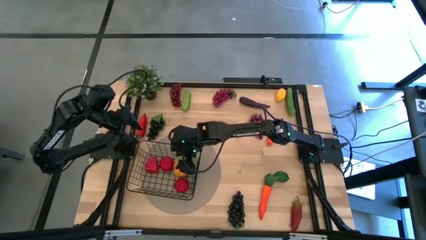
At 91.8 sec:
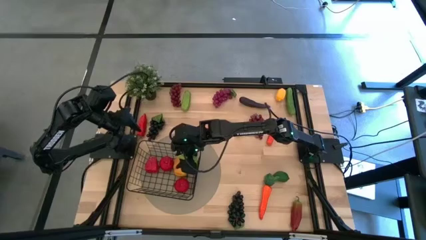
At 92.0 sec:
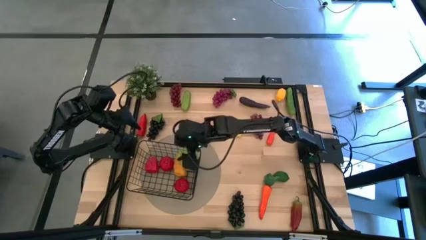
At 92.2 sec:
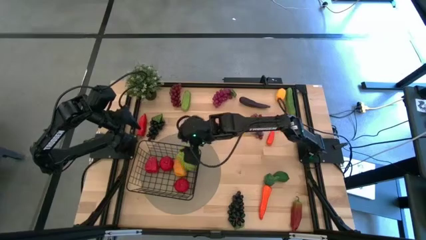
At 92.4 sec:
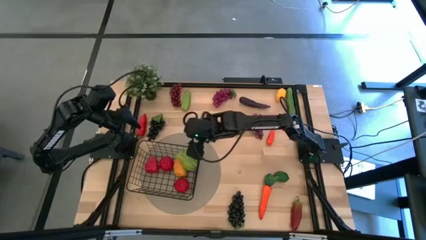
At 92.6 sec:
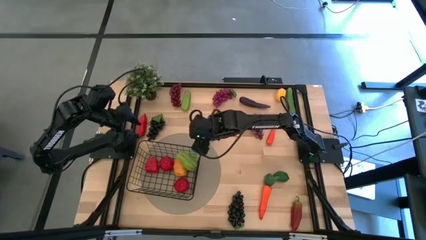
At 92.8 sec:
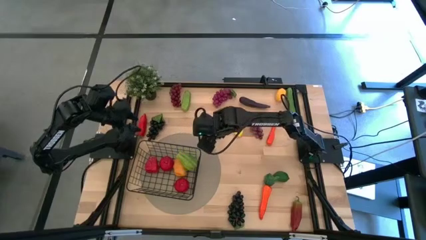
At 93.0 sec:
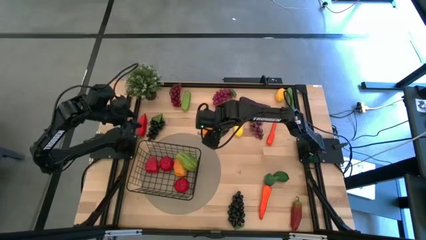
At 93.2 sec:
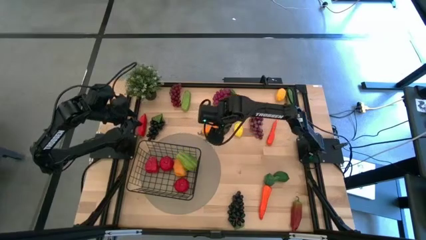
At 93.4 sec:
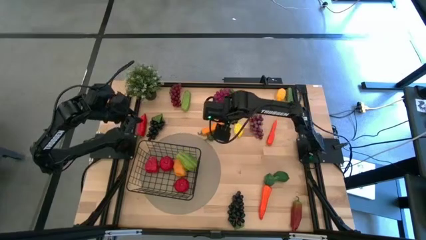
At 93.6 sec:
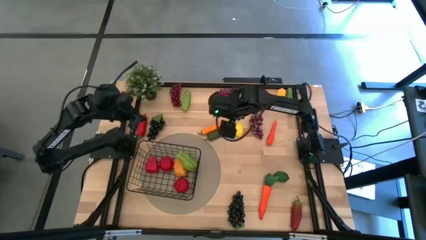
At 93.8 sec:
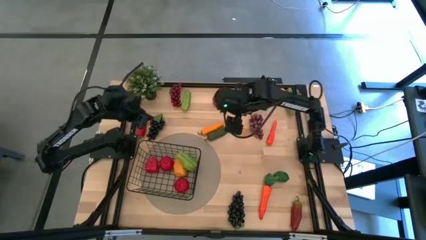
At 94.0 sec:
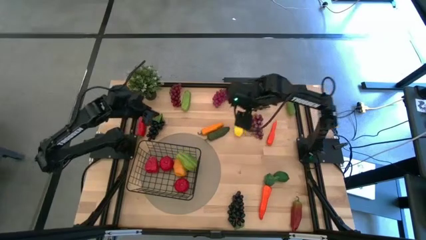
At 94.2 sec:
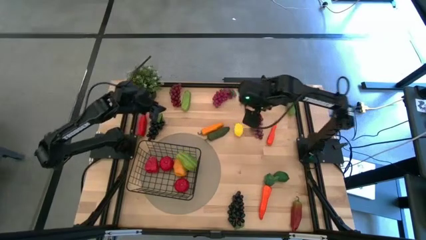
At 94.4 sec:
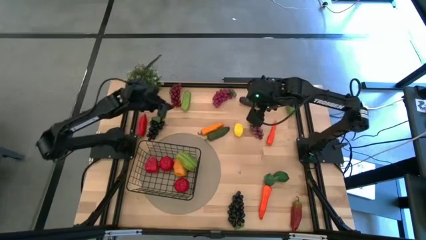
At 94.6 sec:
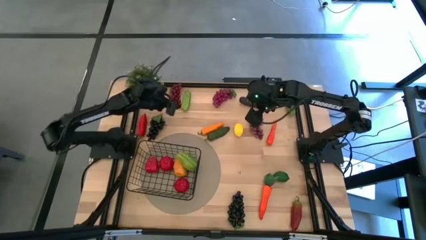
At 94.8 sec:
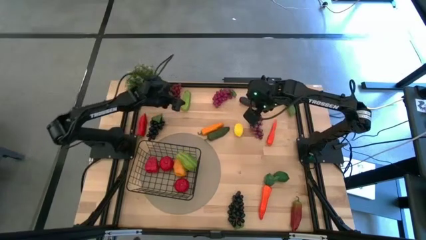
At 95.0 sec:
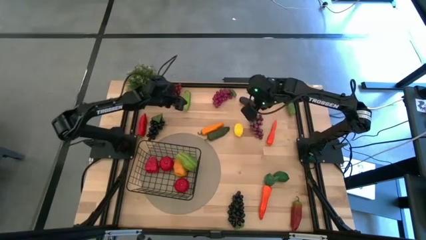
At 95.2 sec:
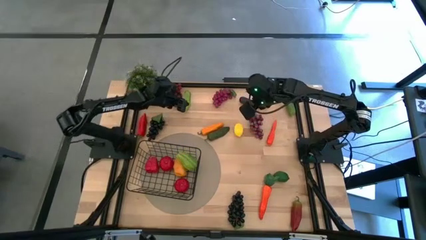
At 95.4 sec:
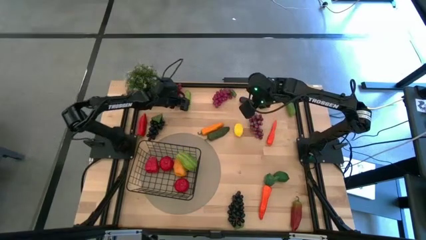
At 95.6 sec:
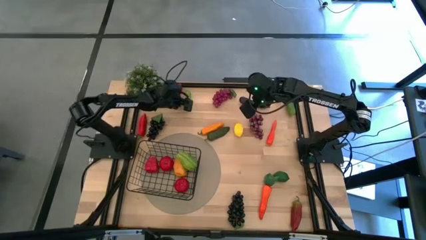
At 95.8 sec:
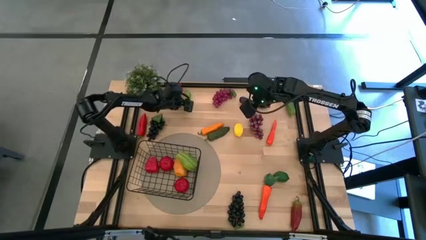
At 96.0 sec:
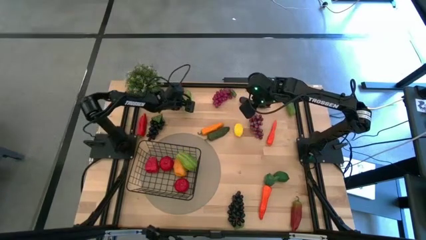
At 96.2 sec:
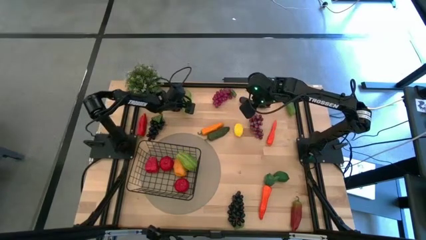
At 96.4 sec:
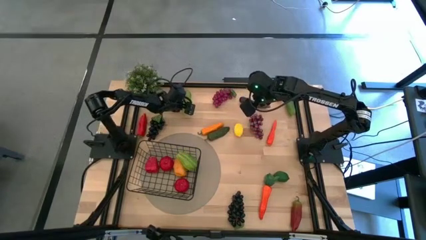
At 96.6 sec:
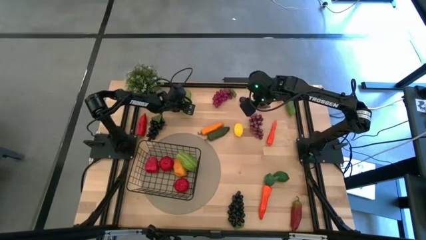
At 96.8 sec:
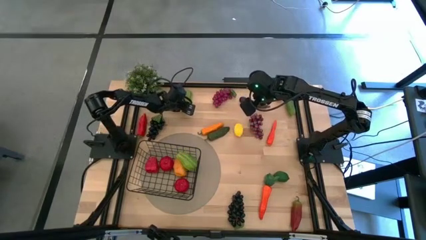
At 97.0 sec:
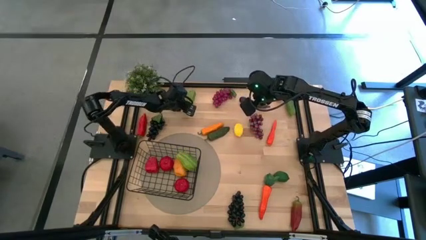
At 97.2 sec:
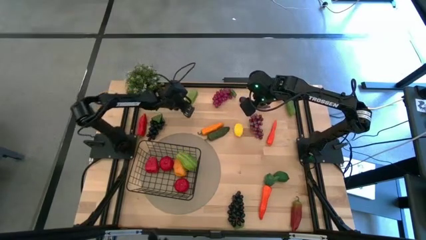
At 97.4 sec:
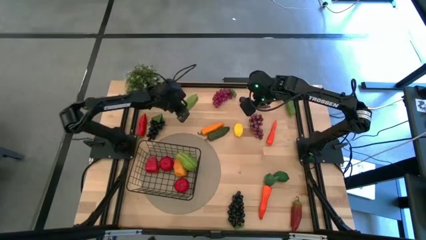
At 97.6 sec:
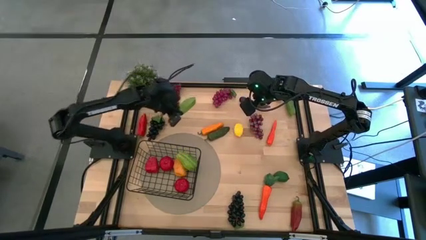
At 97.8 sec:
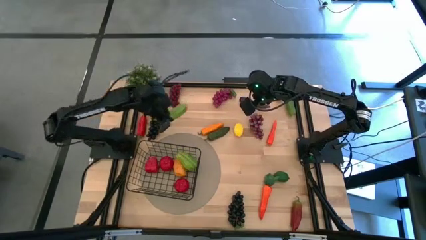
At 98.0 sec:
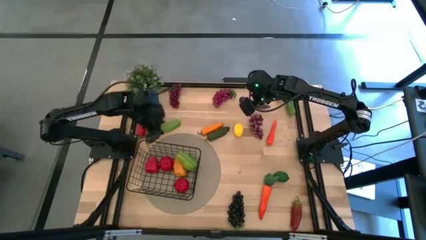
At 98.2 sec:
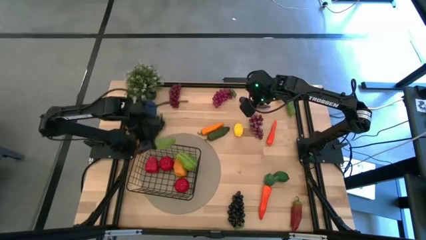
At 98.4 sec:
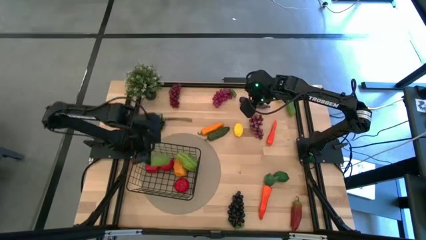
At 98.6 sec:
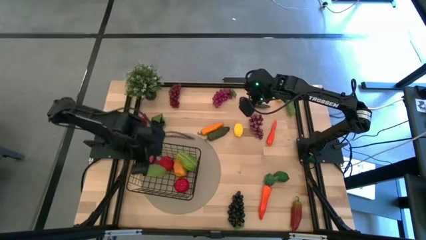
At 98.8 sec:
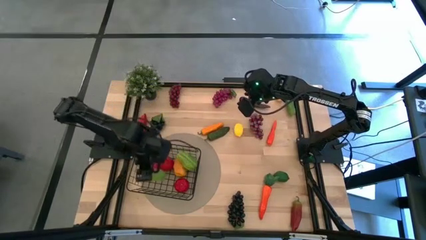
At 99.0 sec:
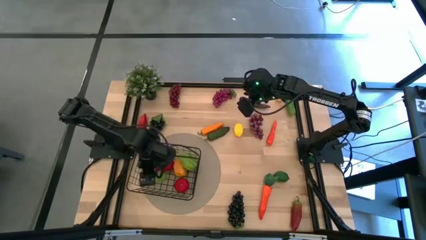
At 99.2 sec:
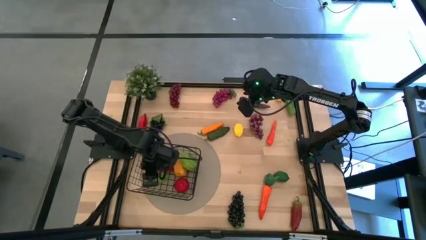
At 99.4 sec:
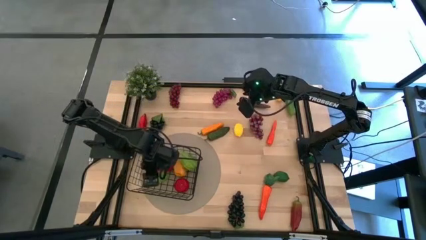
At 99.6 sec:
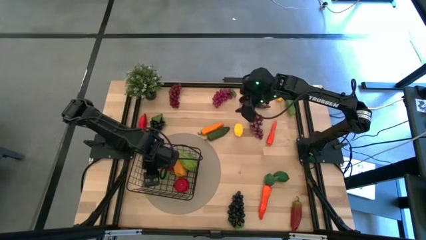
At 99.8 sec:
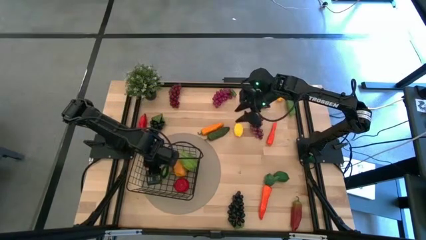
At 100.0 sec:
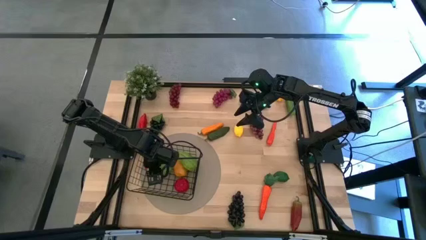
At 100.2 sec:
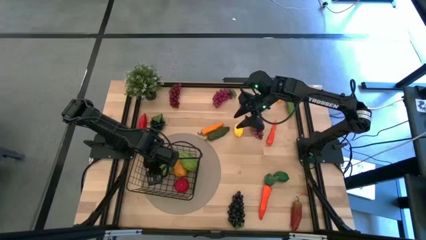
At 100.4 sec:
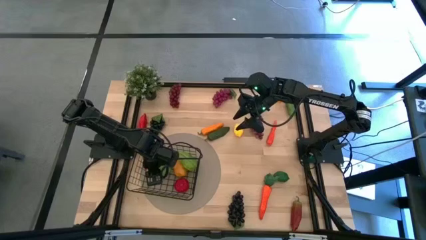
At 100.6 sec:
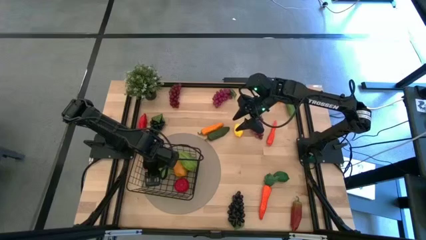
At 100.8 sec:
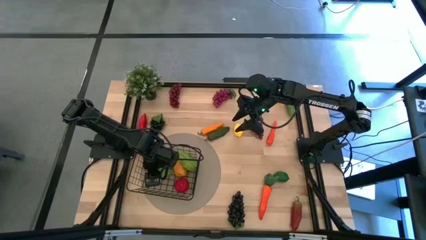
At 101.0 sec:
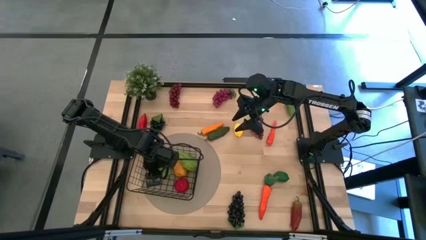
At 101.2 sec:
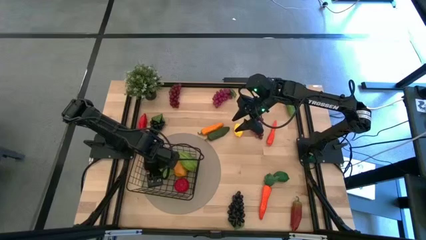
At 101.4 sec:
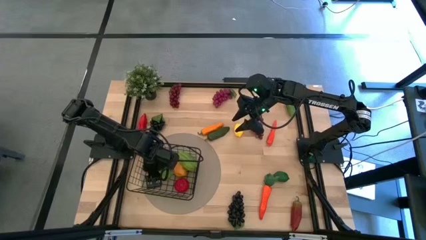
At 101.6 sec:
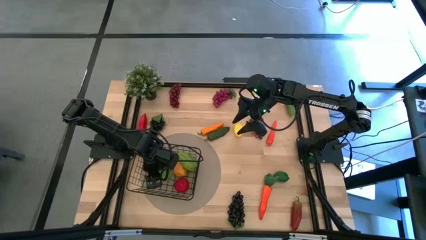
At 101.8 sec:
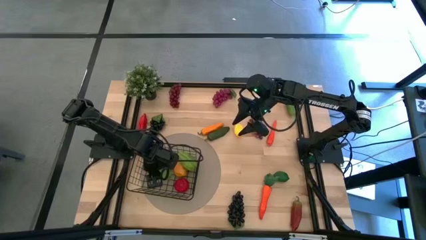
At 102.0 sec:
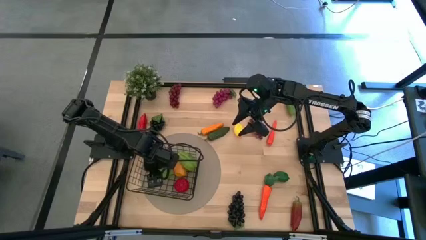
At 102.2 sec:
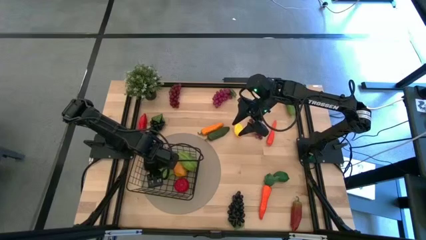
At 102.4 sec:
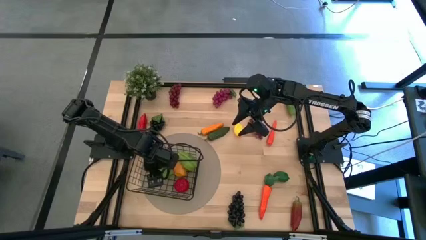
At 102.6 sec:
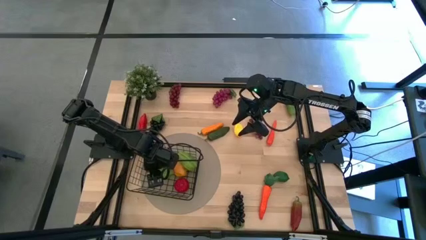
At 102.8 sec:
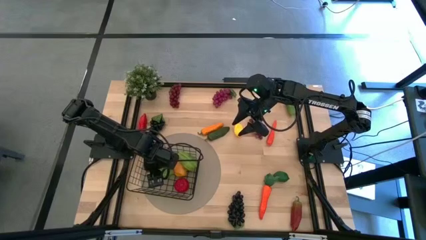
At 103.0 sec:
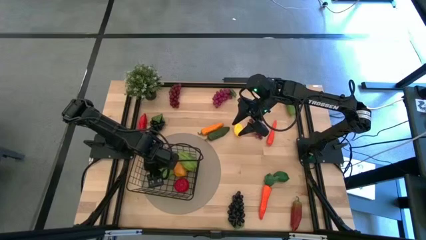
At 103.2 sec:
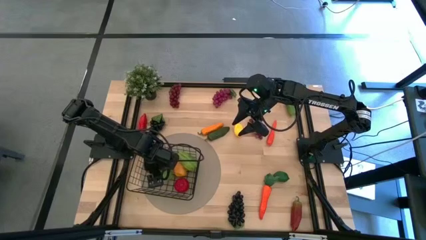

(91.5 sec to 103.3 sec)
Task: Build produce basket
Put the left green cucumber into the black wire basket

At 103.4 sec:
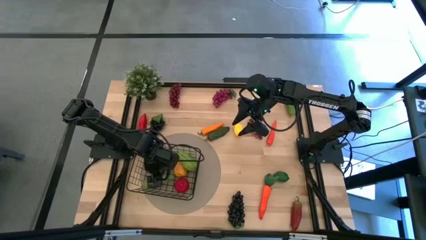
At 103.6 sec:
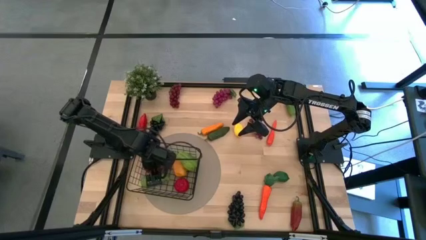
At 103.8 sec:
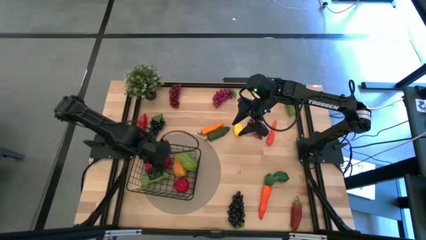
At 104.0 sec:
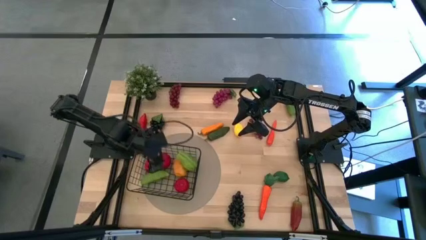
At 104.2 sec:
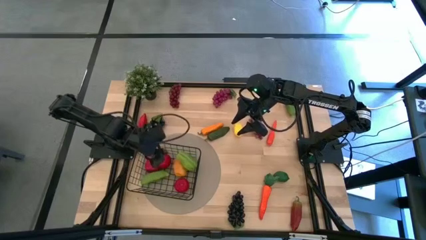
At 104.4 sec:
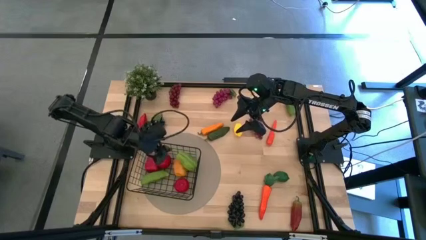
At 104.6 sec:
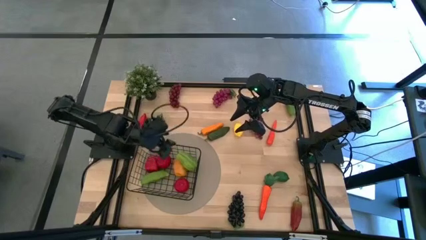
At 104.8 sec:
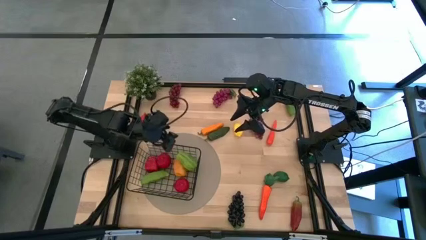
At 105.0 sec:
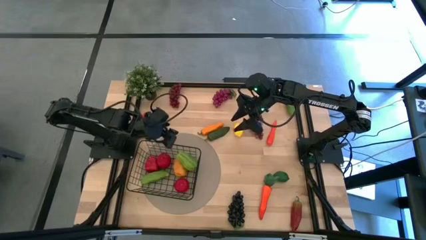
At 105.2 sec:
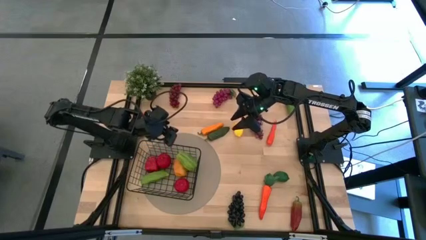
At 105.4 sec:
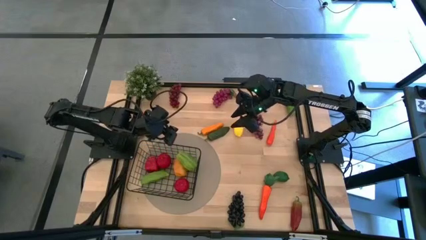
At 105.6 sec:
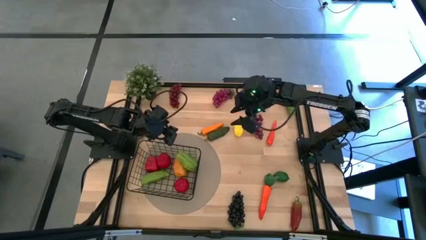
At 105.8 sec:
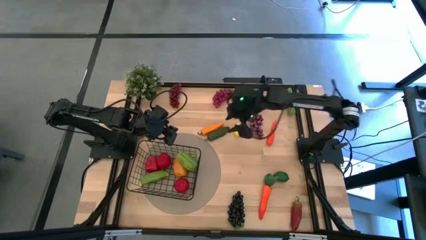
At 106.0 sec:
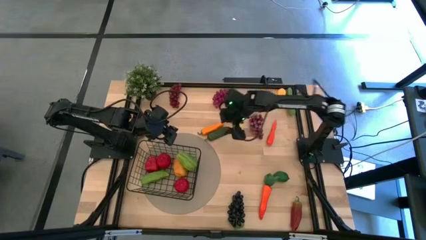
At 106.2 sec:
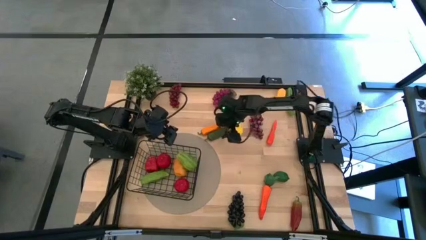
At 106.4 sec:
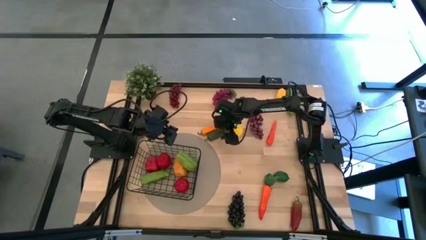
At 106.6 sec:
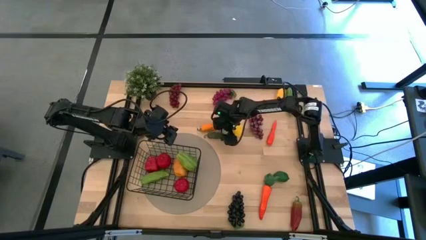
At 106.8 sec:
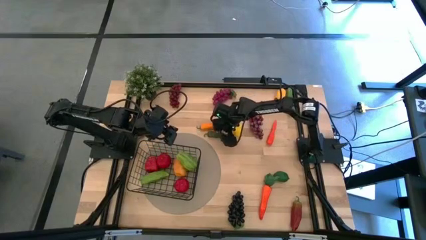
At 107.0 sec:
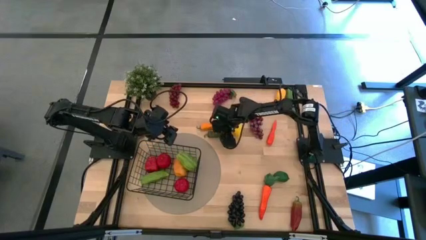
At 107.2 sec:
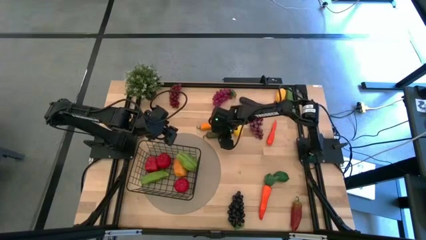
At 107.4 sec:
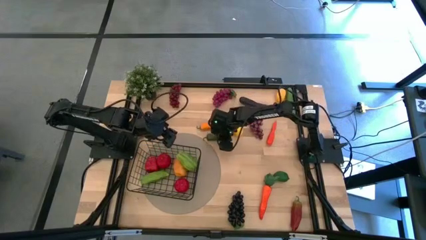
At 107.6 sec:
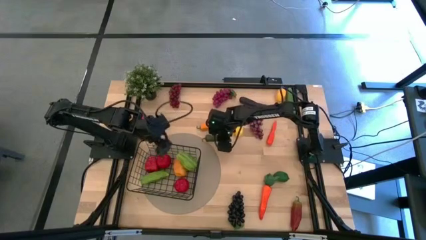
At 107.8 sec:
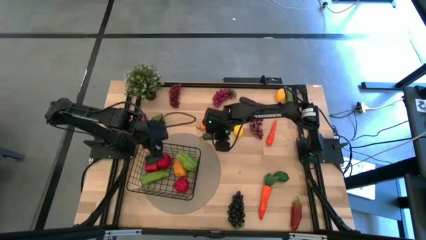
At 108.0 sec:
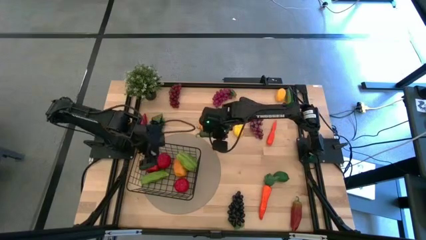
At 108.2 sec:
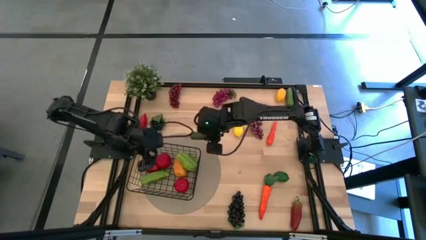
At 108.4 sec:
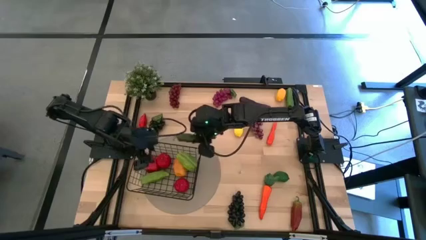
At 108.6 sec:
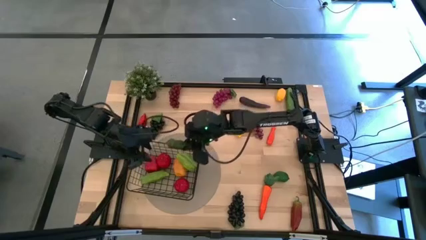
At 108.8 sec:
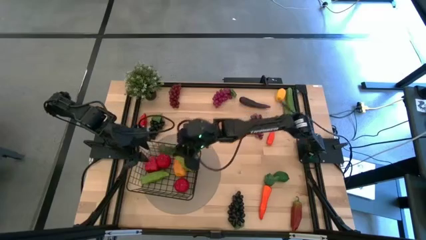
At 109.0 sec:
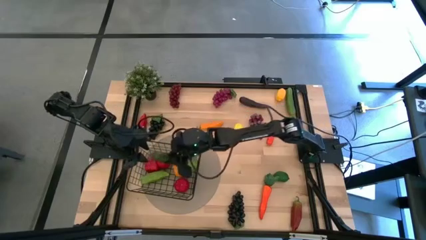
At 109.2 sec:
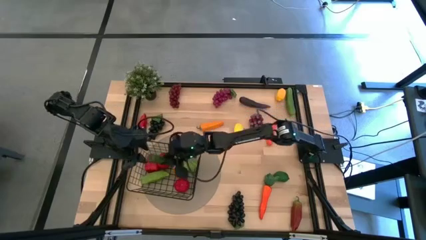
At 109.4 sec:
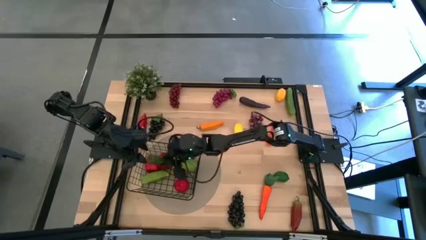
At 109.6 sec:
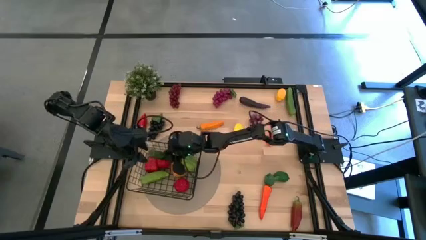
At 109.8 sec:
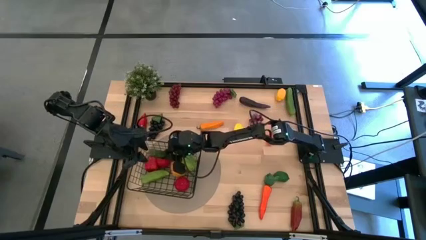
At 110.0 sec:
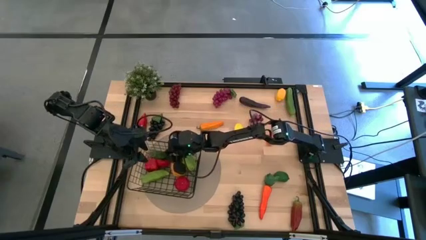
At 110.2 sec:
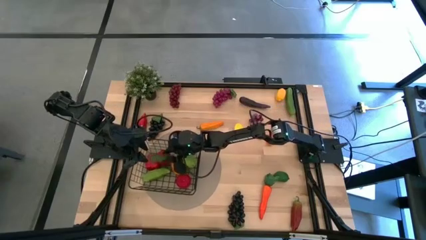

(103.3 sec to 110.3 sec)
Put the green chili pepper into the black wire basket
